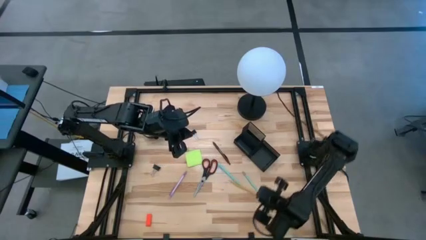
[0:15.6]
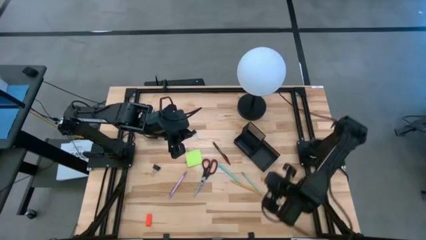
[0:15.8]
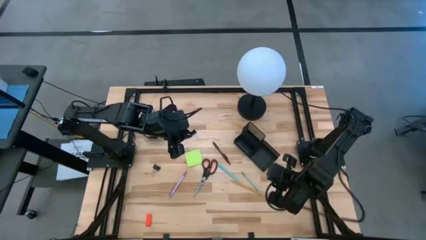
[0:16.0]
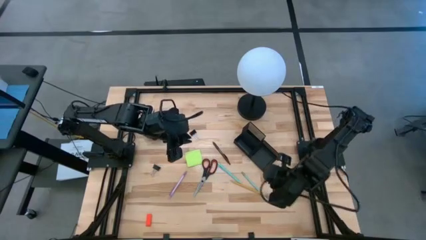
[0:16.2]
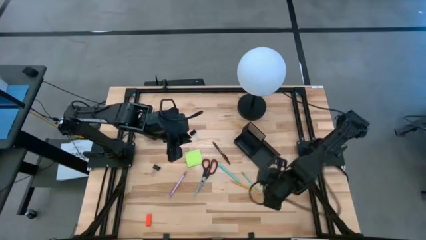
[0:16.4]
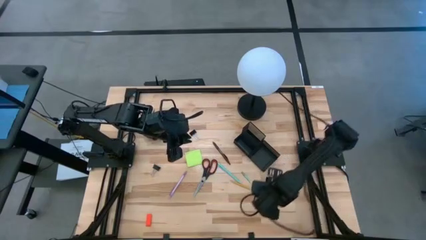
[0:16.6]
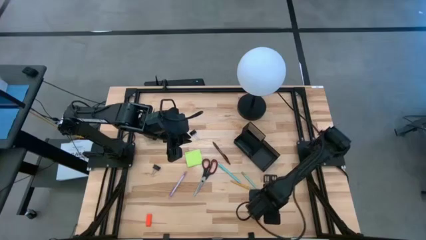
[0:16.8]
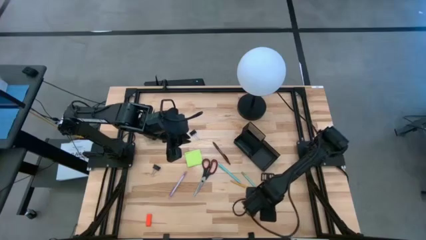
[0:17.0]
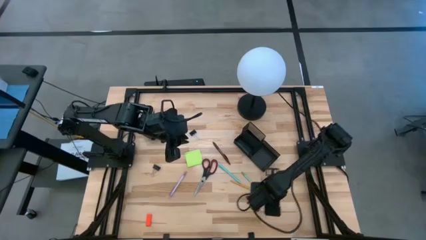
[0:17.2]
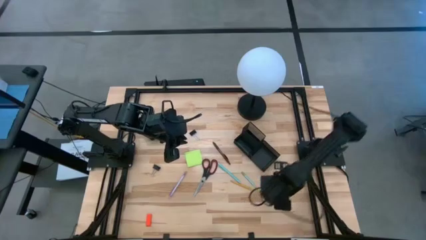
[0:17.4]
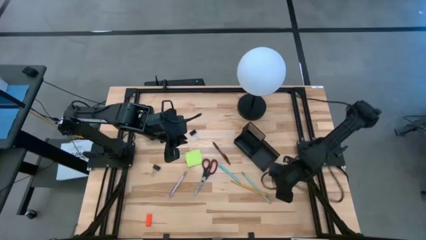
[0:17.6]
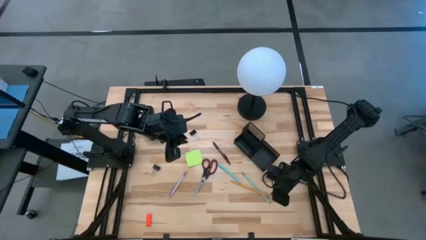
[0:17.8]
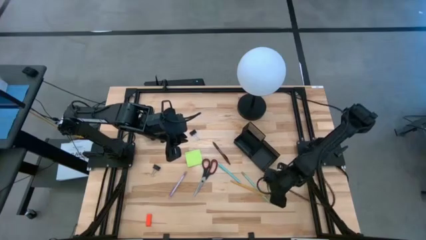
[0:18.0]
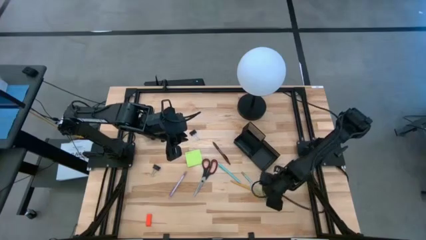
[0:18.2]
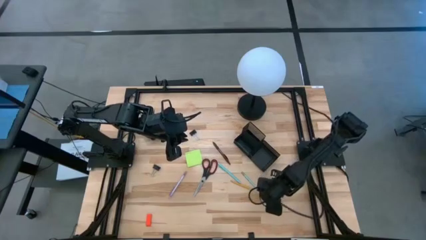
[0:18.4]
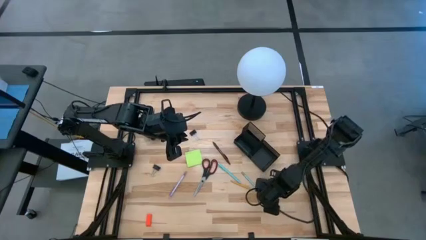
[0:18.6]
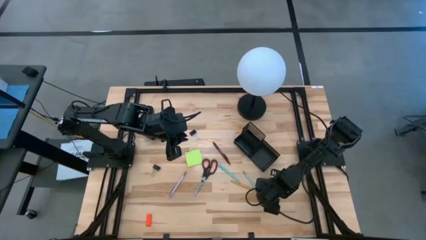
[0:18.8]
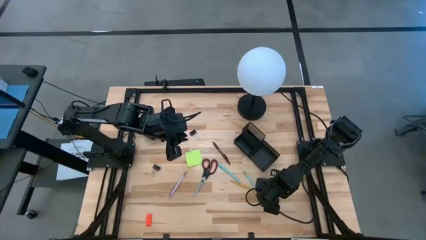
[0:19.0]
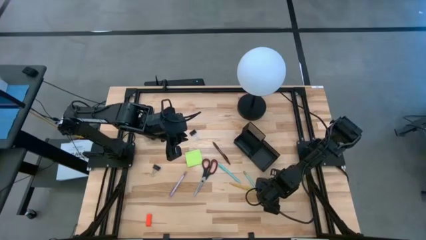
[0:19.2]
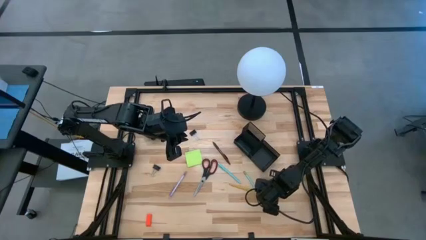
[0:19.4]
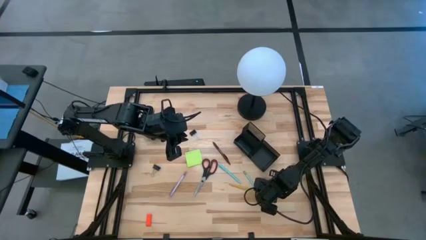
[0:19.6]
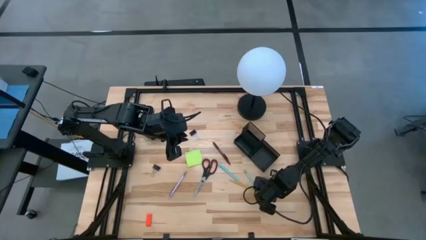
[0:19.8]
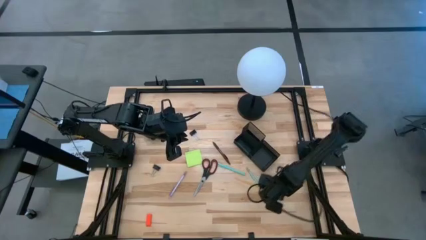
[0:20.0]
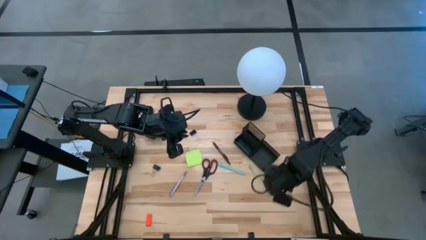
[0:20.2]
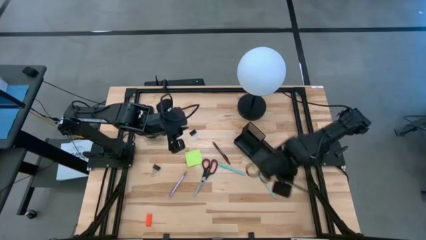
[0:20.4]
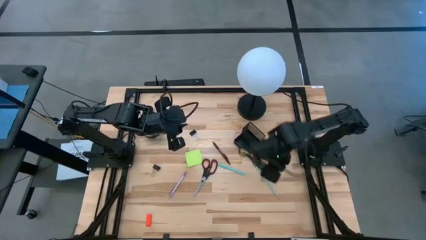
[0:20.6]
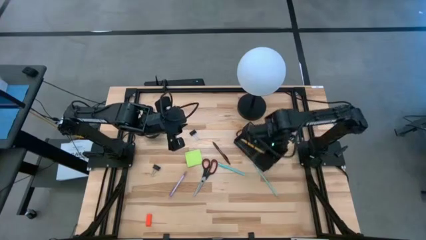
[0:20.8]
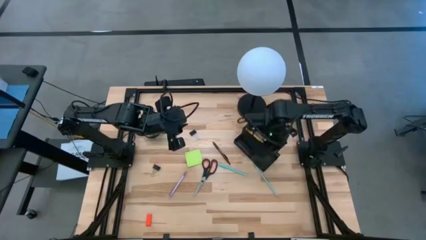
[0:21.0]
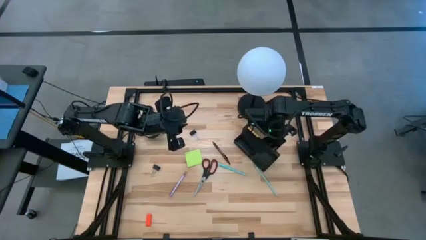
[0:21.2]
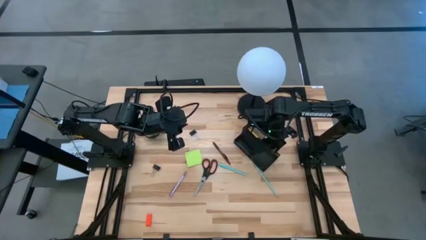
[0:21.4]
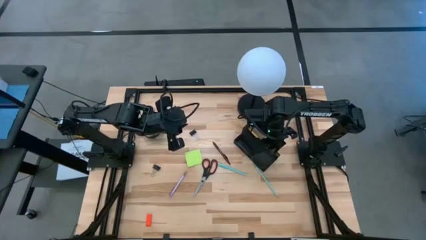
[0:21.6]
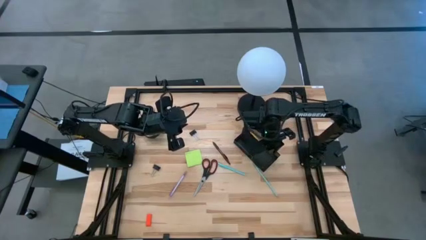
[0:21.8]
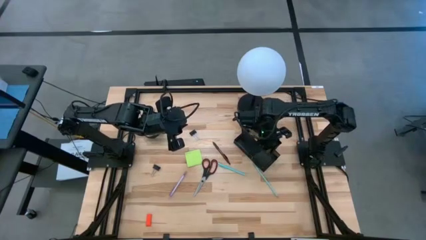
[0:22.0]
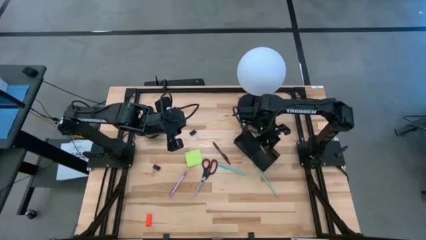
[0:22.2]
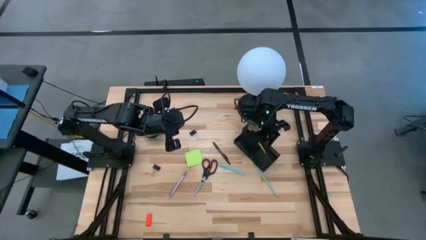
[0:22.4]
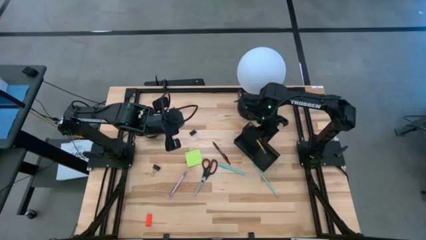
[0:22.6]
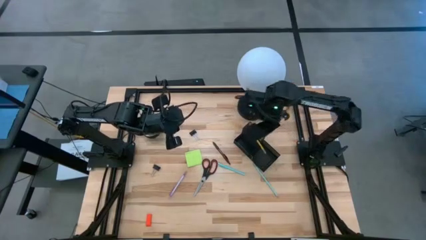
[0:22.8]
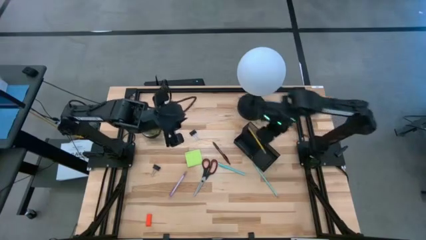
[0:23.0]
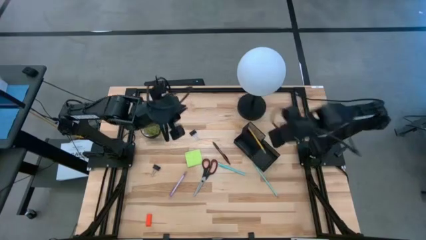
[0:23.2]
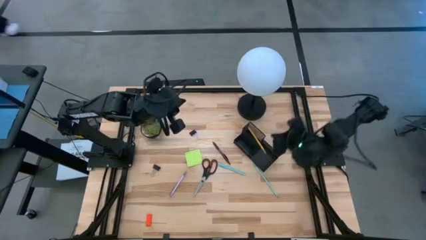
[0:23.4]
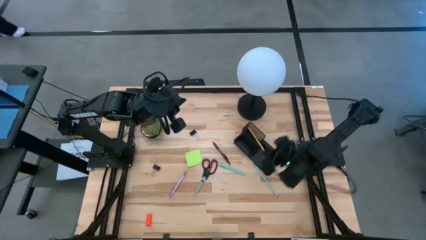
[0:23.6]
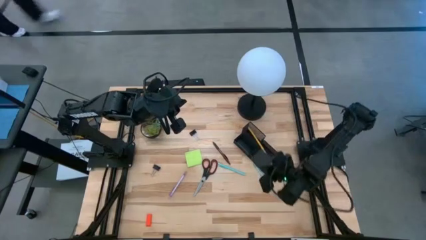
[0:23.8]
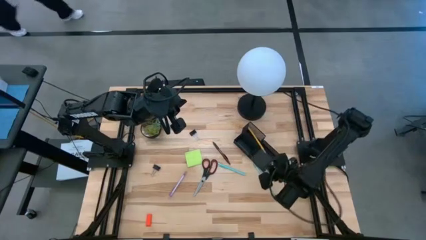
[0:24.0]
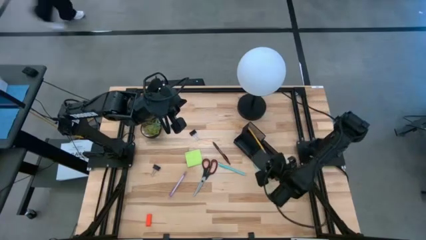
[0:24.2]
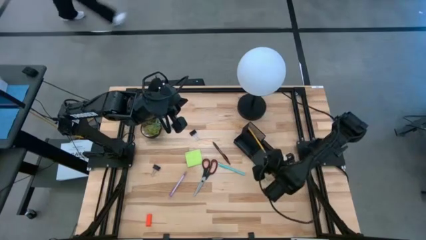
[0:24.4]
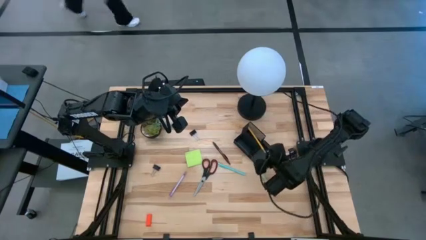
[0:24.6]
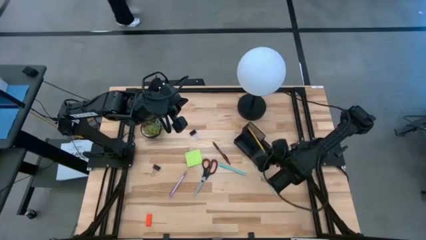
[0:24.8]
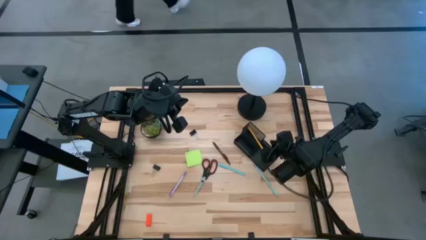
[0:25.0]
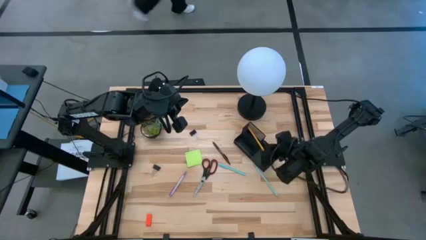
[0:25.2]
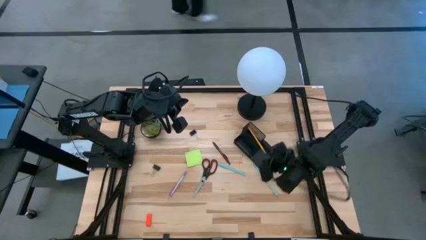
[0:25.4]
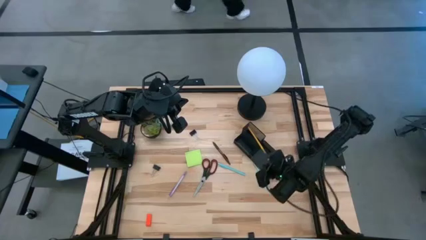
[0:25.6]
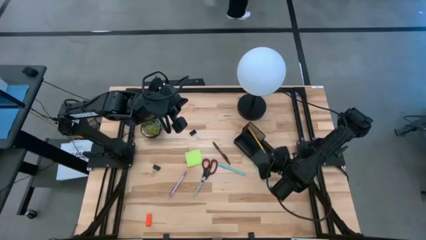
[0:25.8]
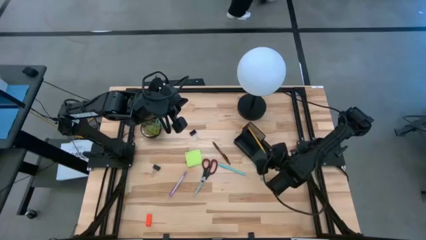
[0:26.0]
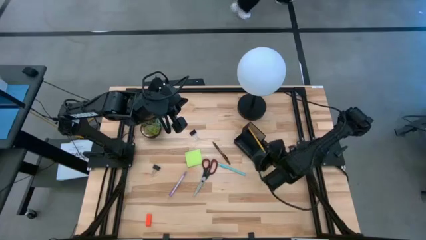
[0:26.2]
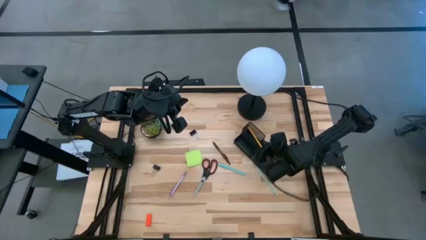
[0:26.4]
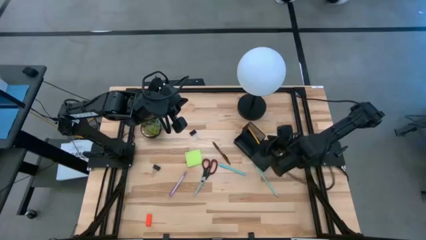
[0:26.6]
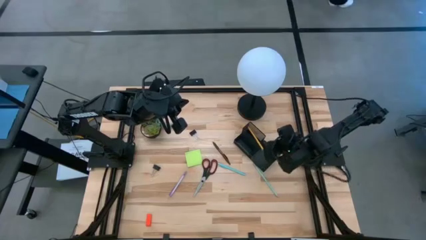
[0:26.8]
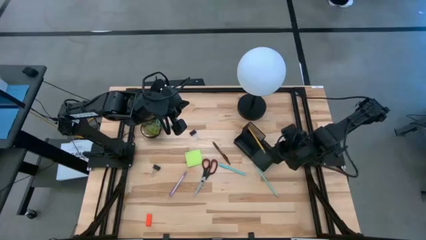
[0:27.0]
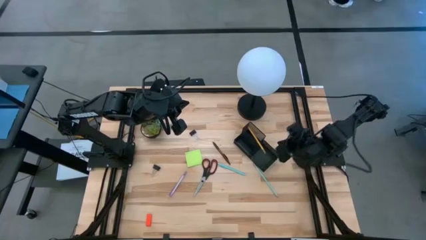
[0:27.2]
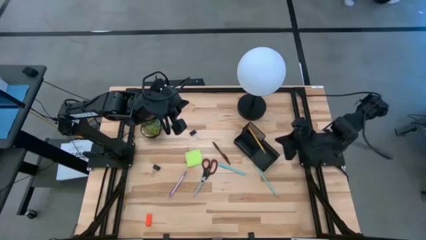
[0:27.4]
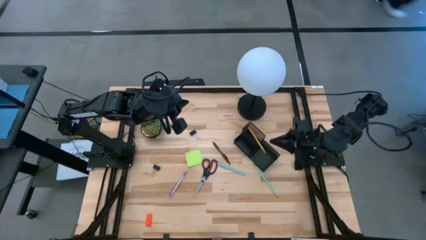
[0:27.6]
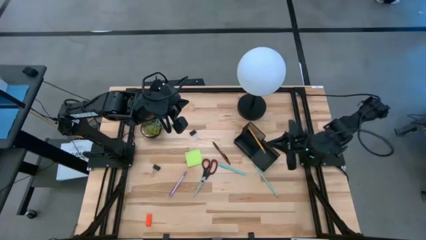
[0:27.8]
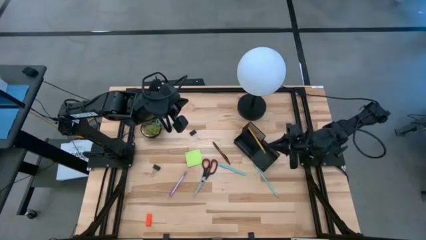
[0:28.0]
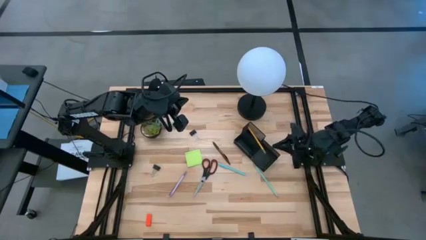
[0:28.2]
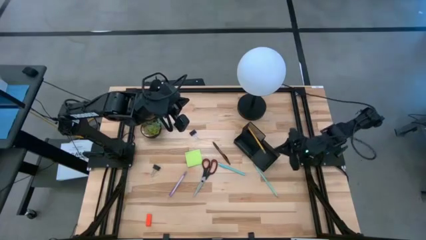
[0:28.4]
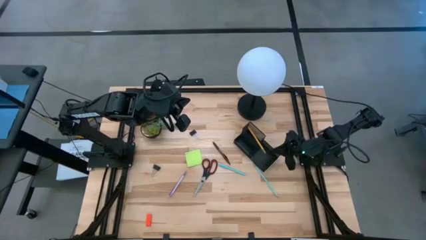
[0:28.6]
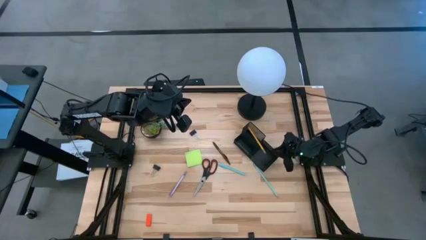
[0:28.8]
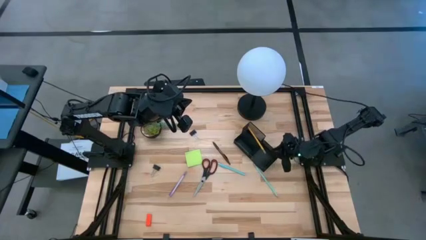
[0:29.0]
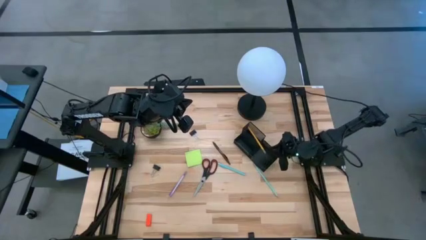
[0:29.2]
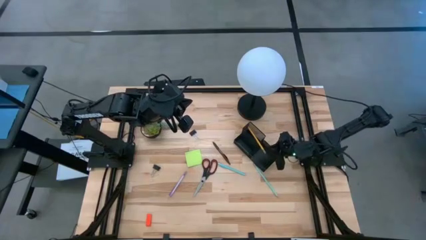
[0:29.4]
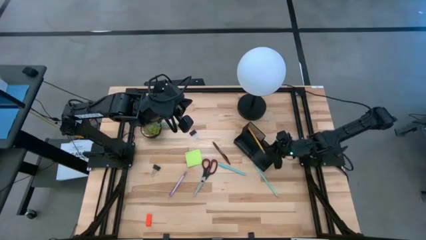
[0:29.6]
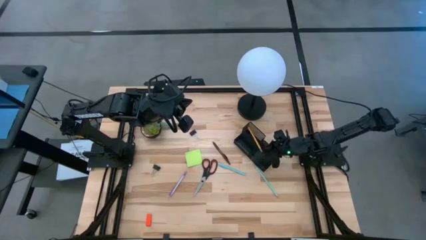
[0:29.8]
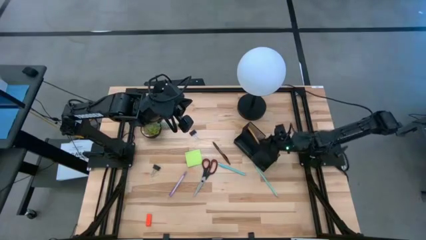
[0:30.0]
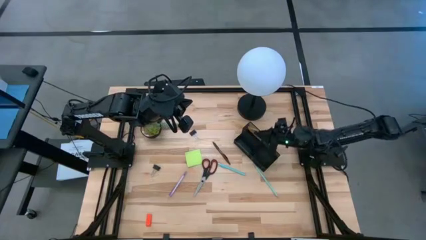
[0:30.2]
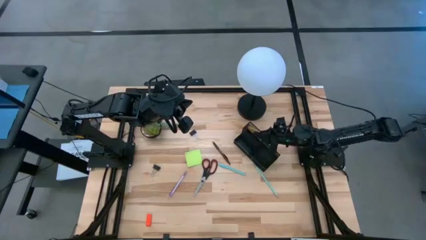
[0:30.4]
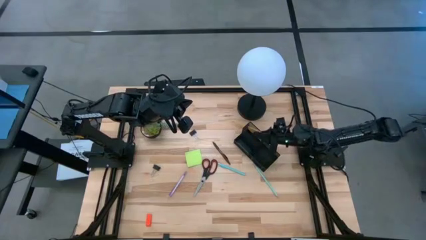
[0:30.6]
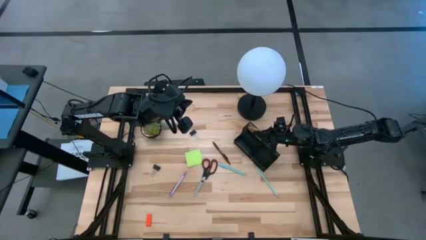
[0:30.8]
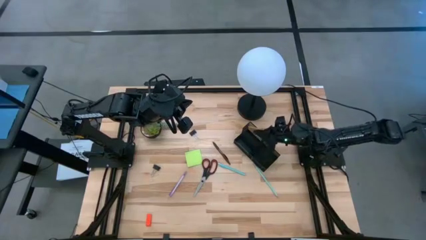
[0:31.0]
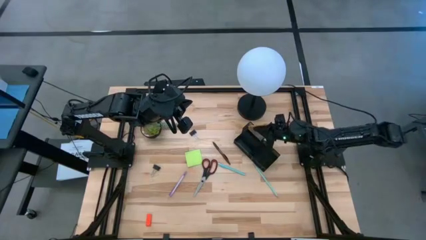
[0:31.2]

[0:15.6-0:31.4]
Task: Pick and place office supplies into organizer
Put the yellow pencil into the black desk organizer
